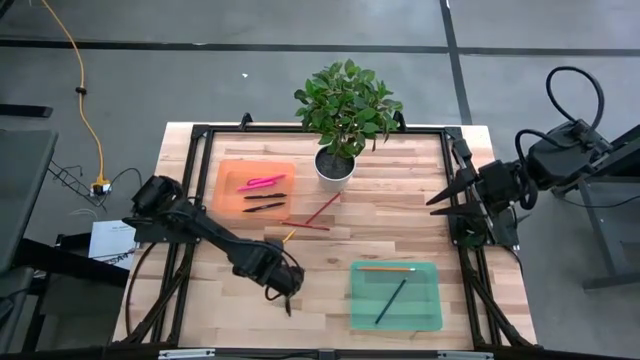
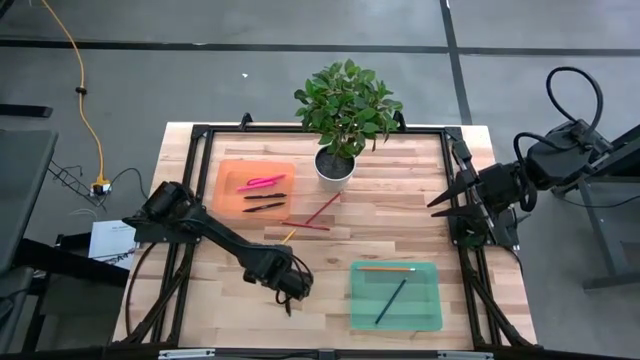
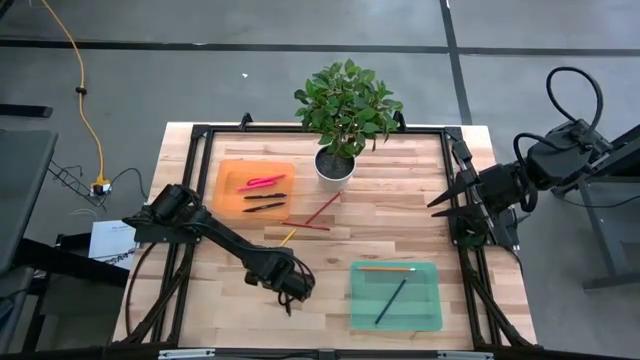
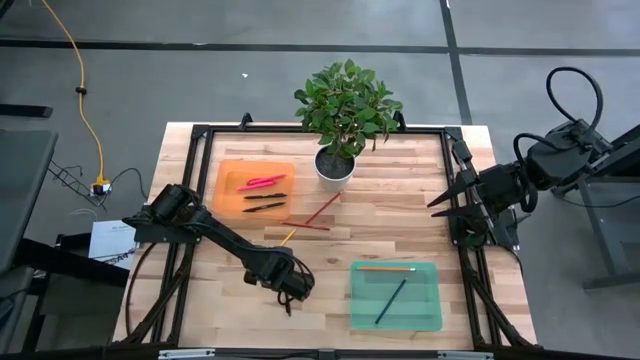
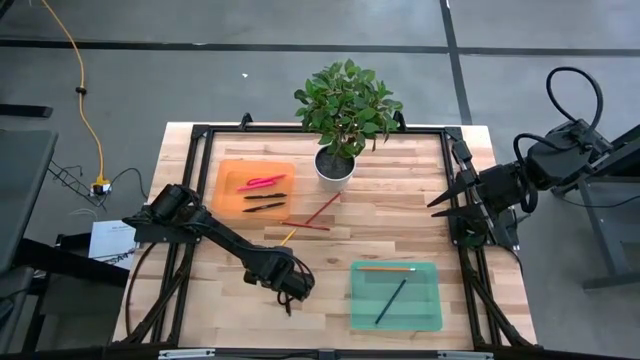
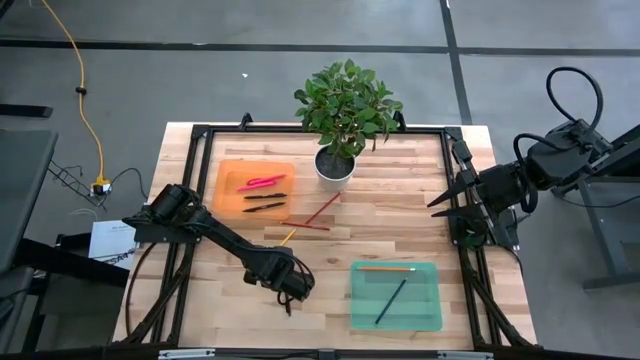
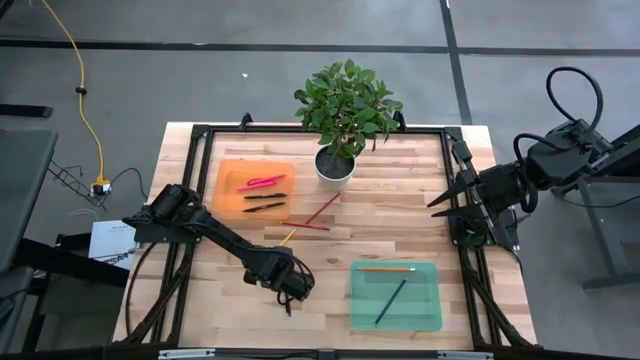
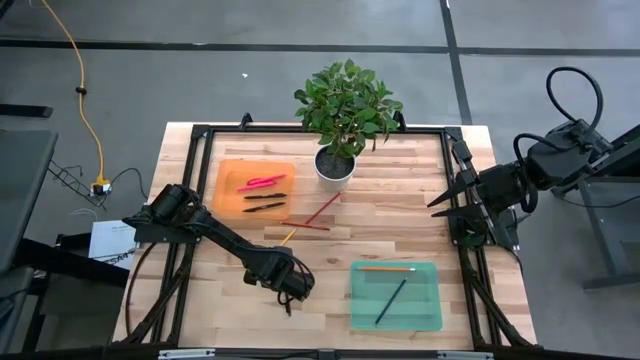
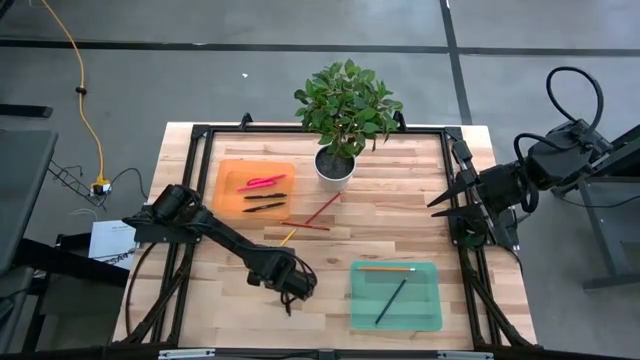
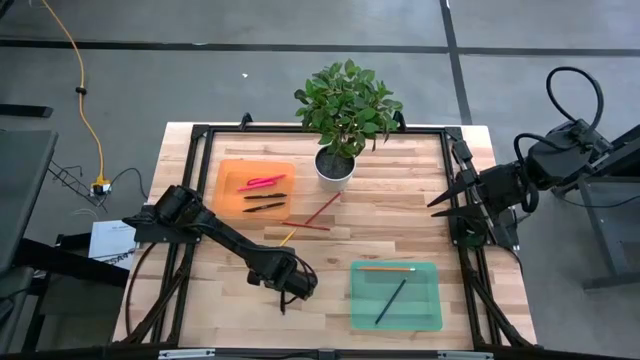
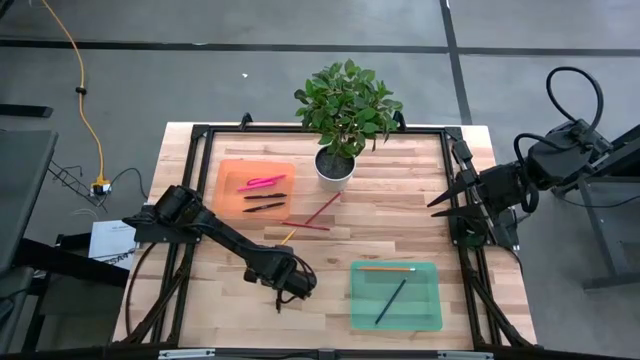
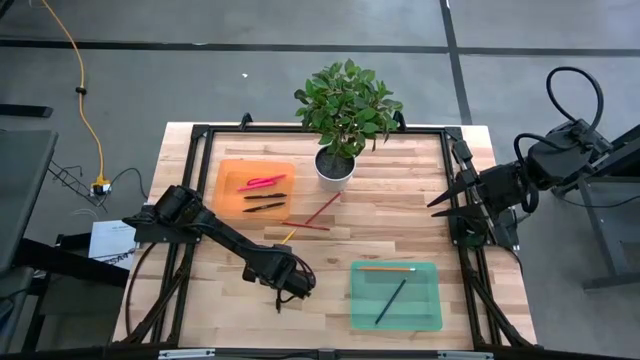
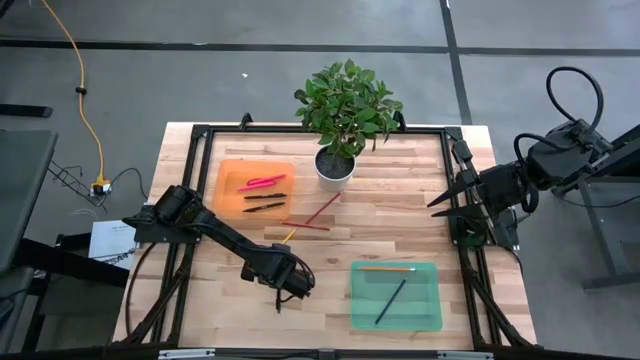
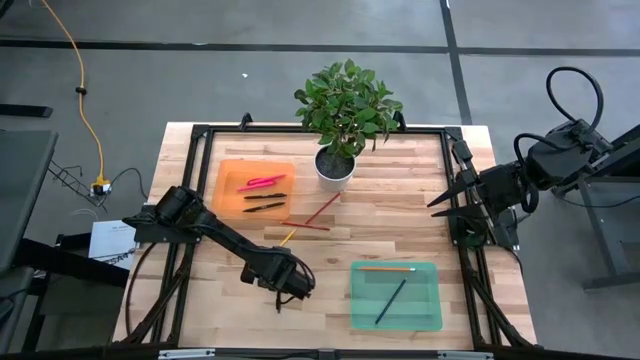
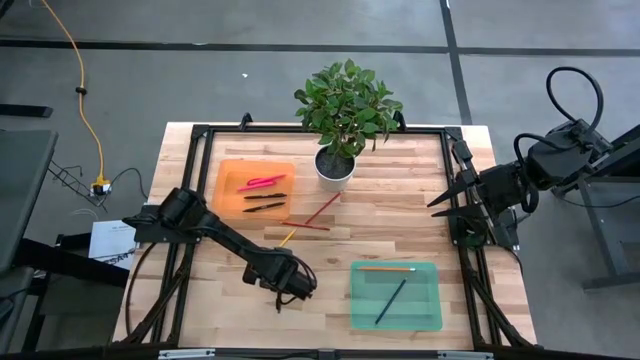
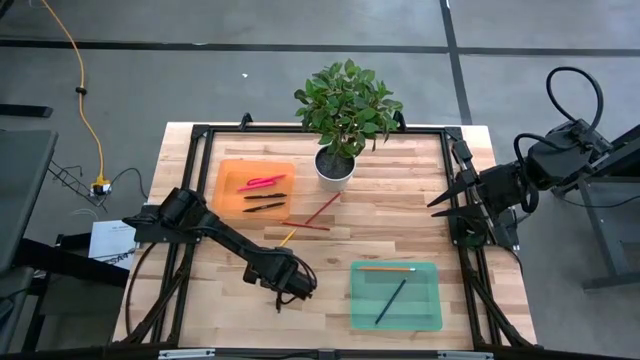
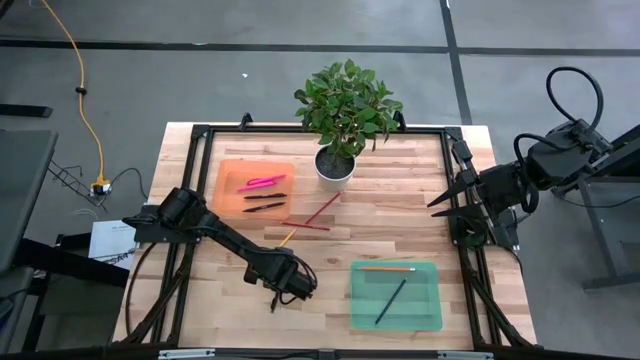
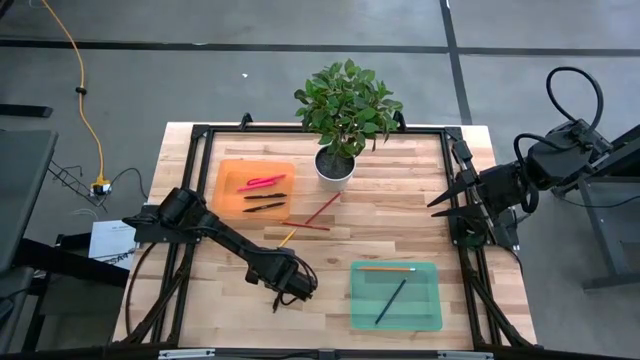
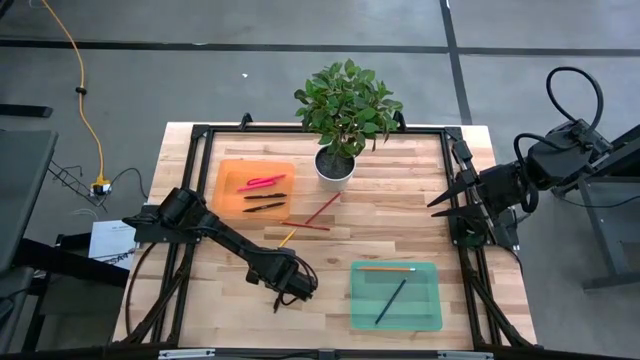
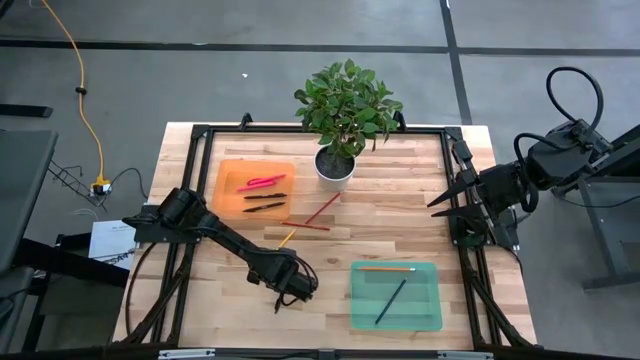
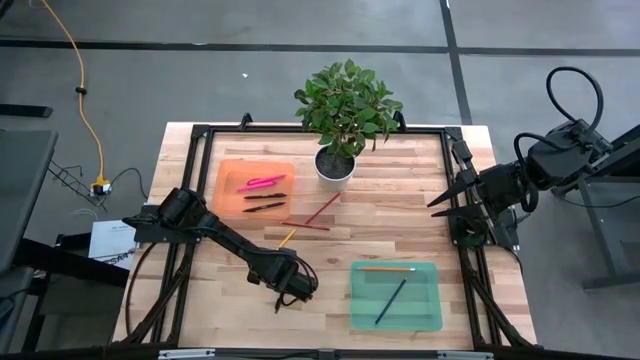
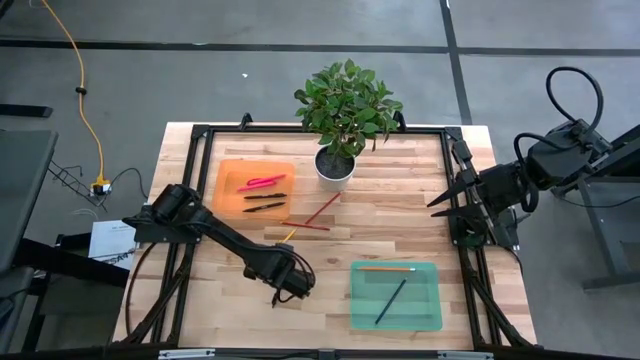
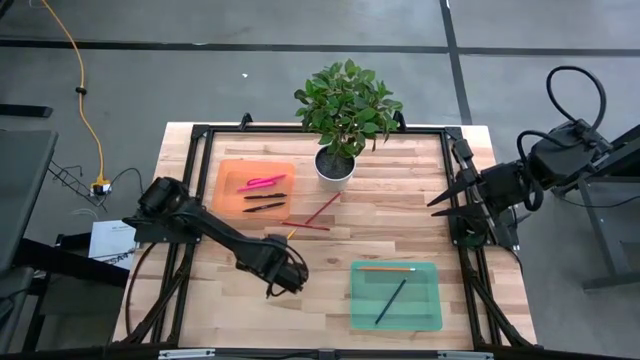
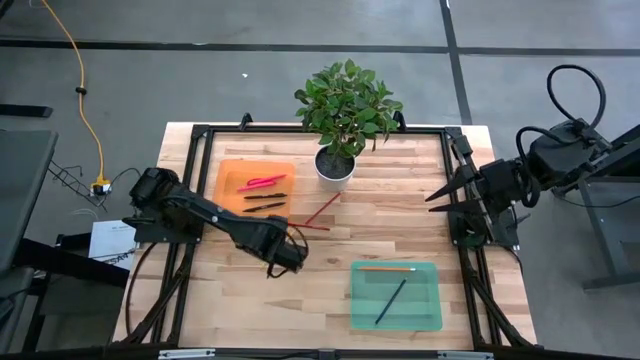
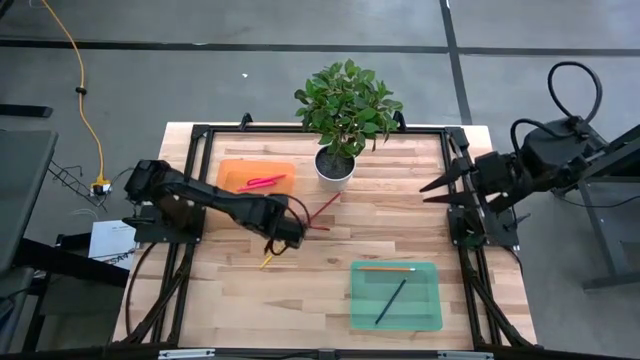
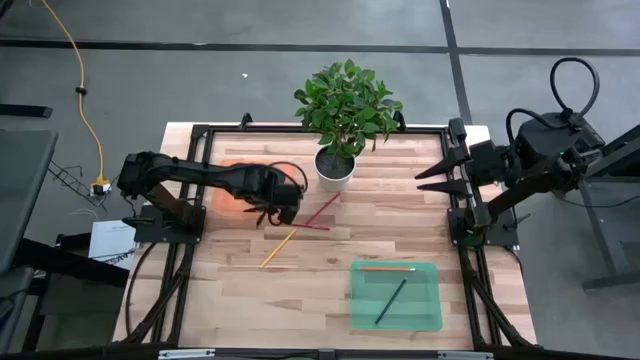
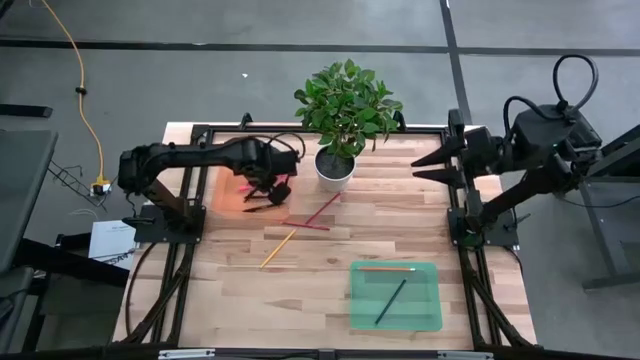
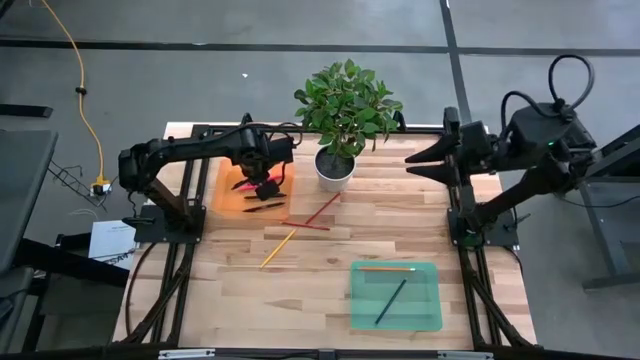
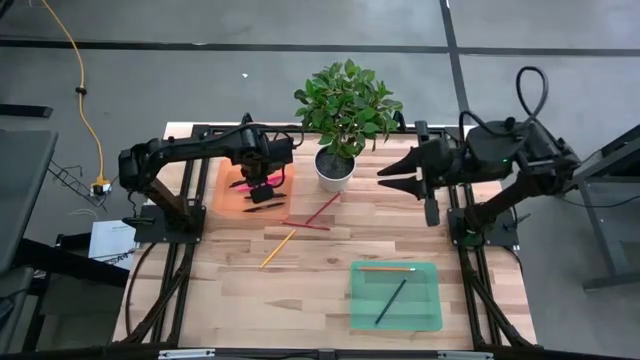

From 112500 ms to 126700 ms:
Task: Sort pens & pencils
Put the black pen into the orange bin

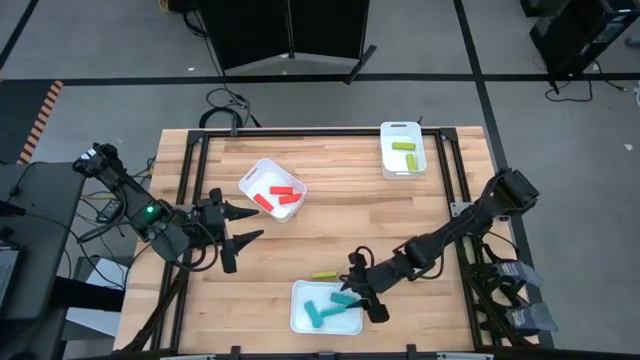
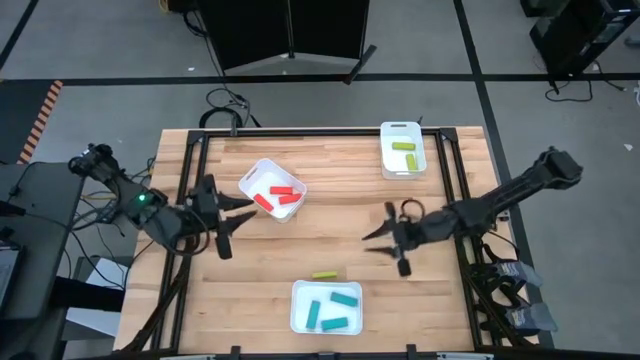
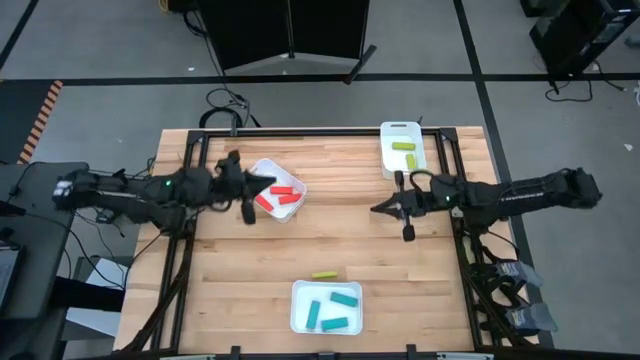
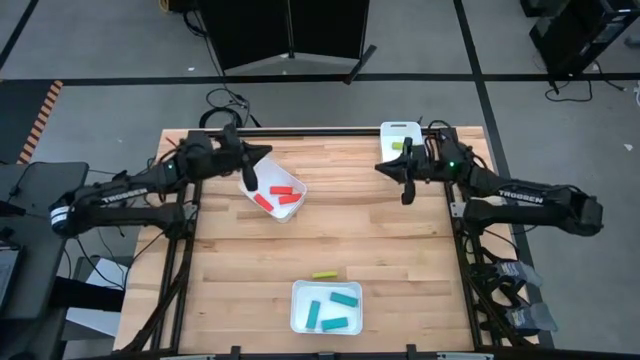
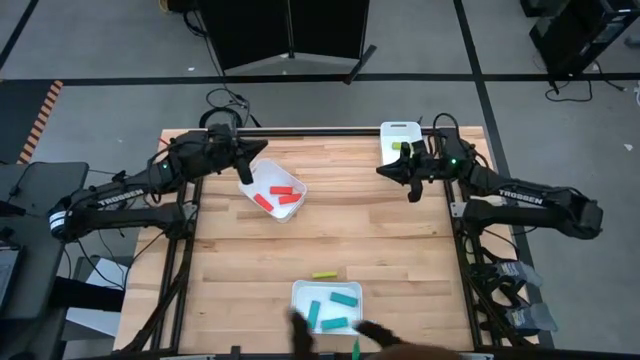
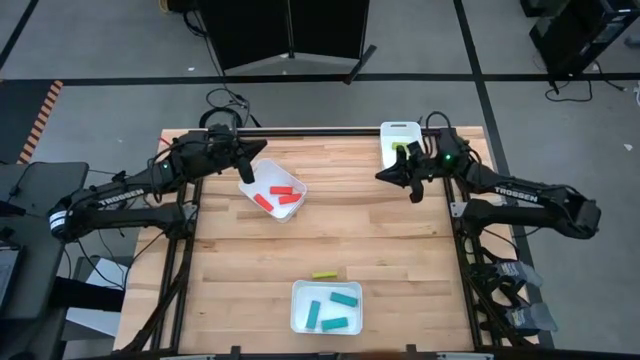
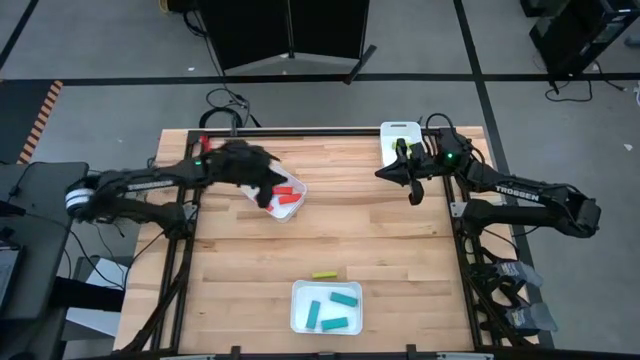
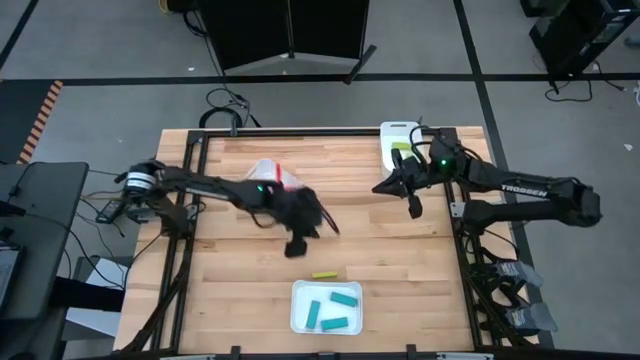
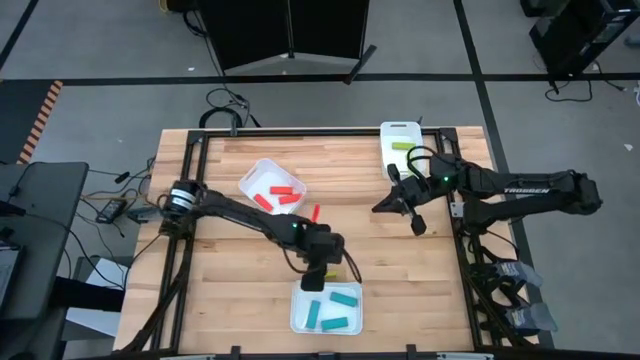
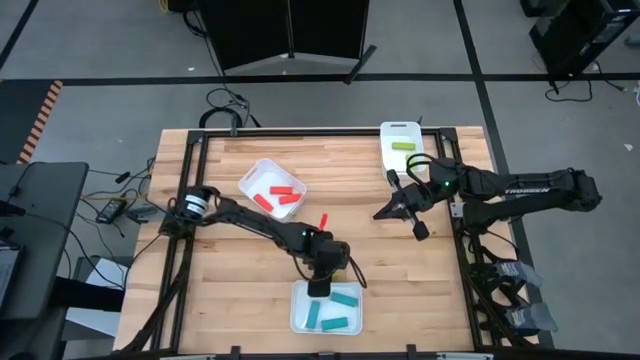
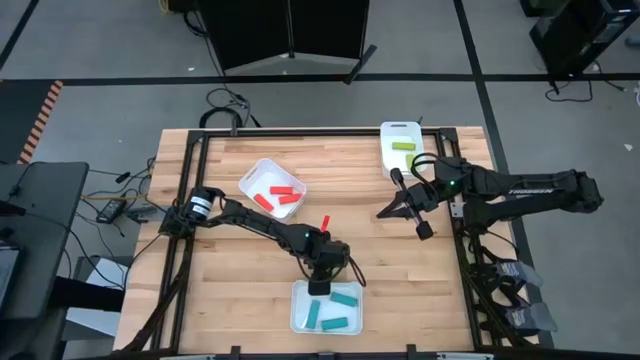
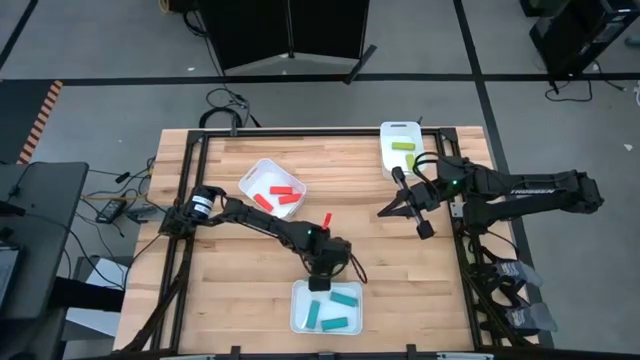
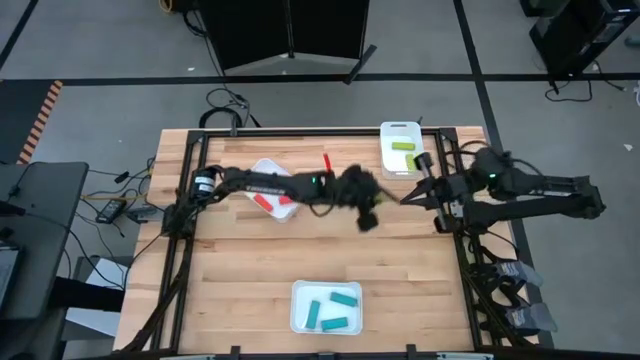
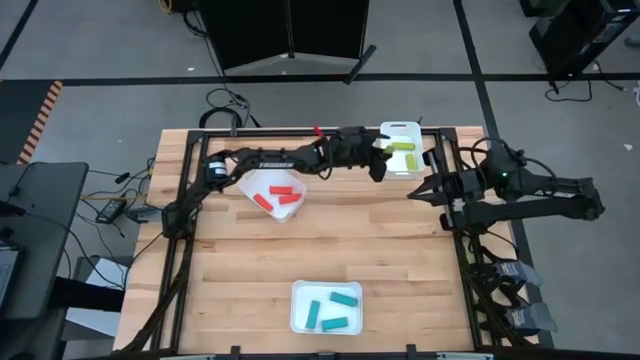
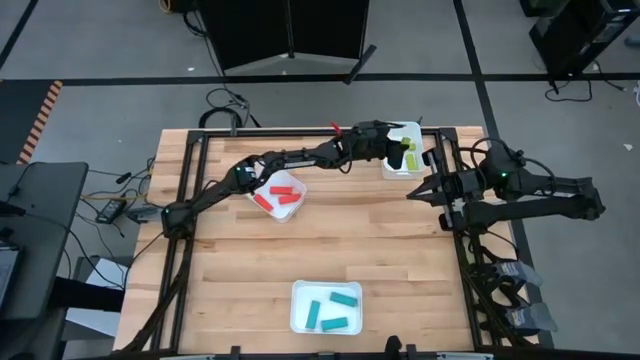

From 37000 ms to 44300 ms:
Task: Sort blocks
Put the green block into the top right bin
